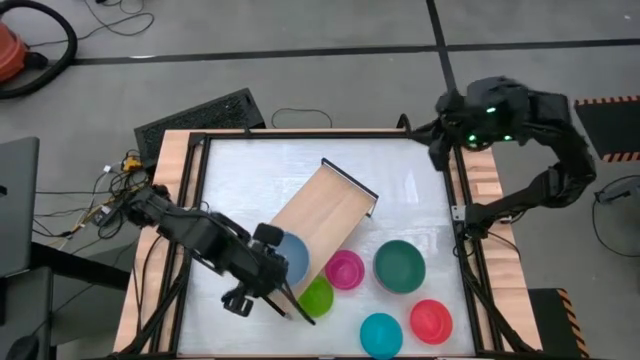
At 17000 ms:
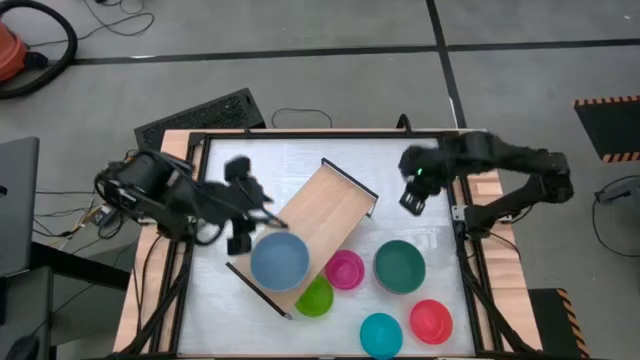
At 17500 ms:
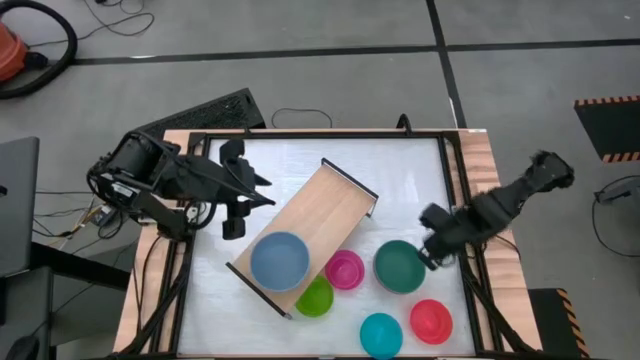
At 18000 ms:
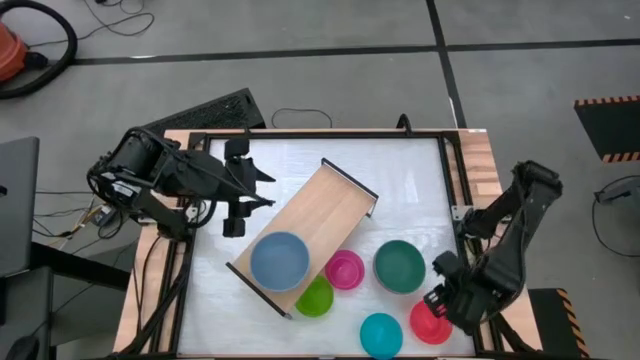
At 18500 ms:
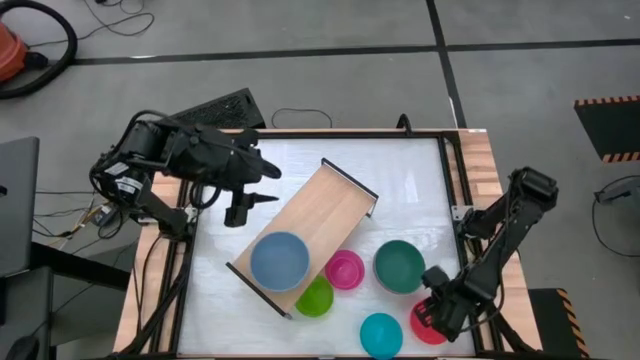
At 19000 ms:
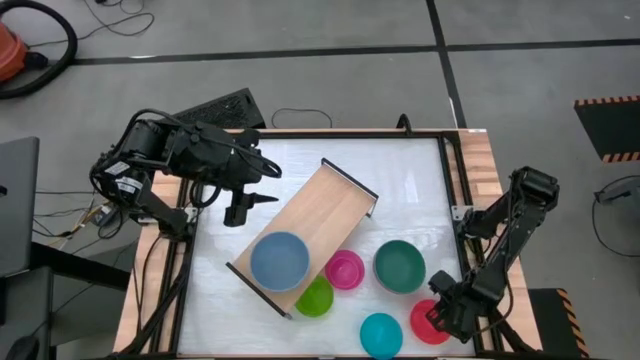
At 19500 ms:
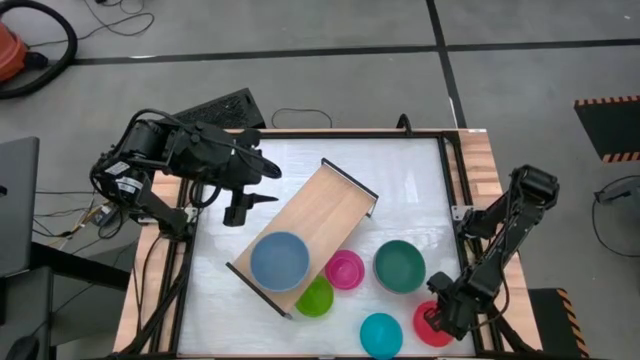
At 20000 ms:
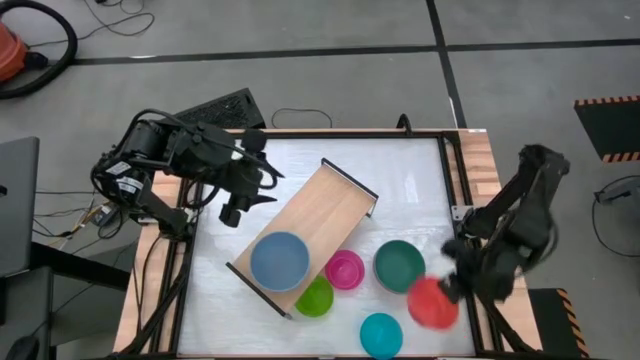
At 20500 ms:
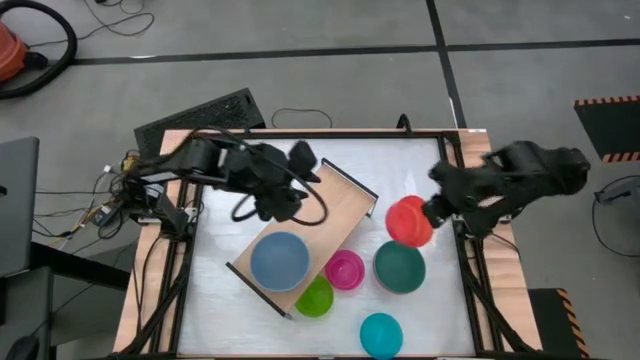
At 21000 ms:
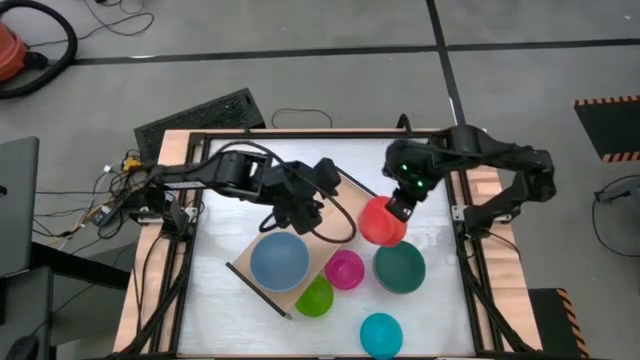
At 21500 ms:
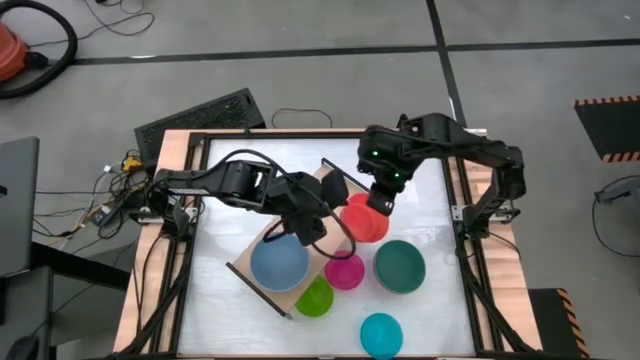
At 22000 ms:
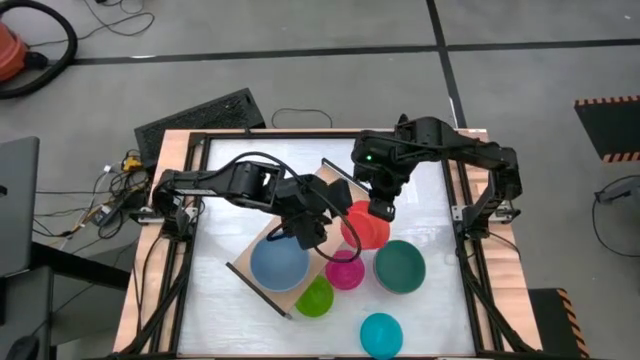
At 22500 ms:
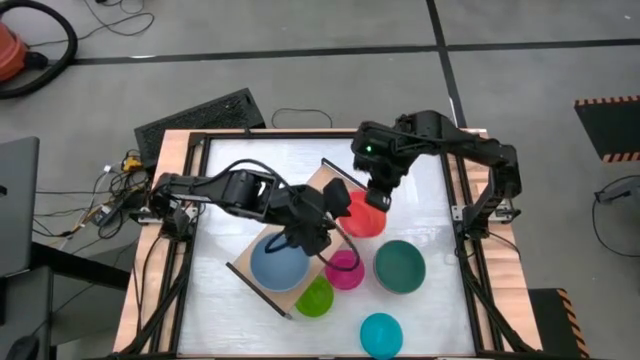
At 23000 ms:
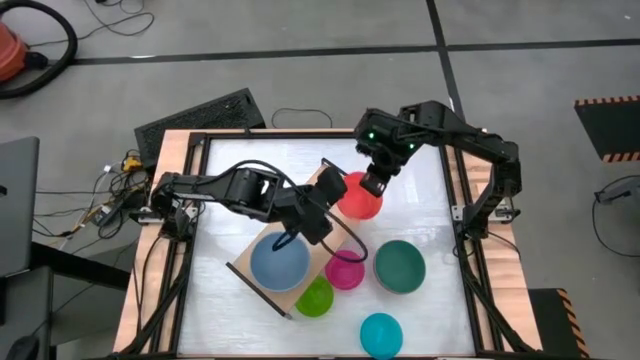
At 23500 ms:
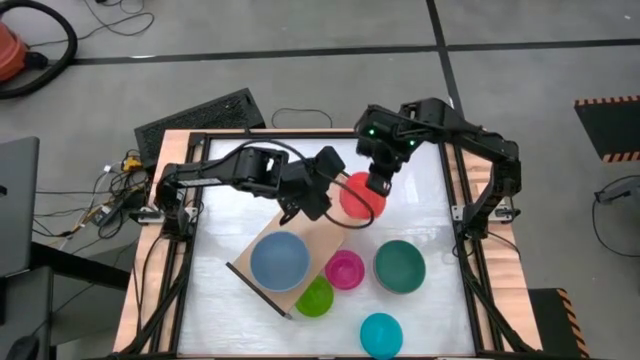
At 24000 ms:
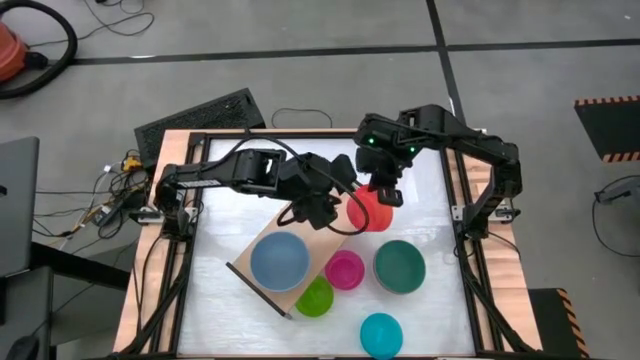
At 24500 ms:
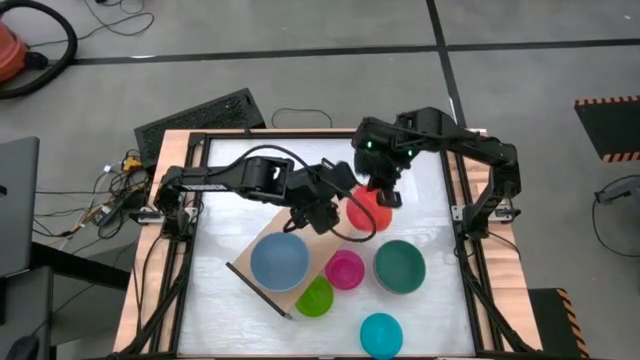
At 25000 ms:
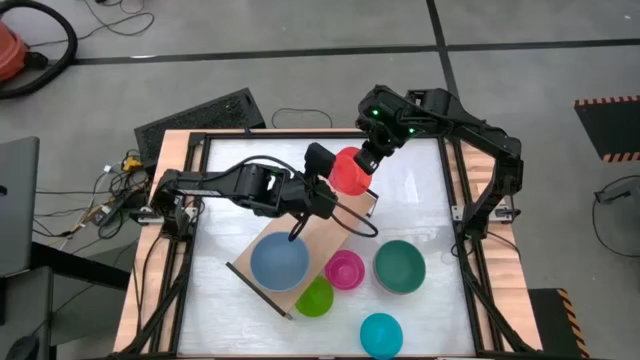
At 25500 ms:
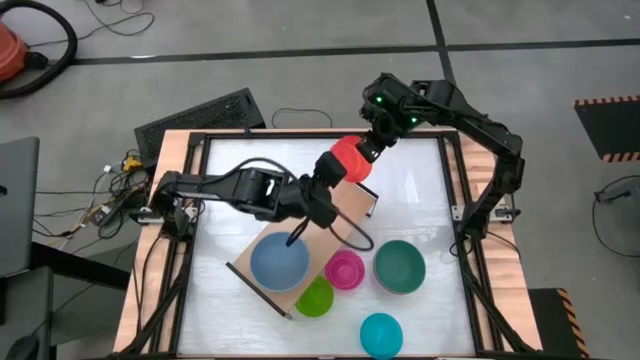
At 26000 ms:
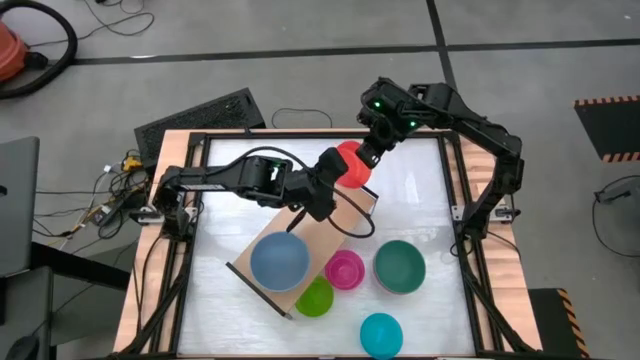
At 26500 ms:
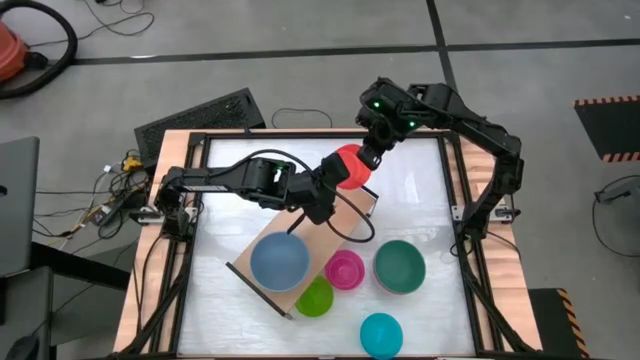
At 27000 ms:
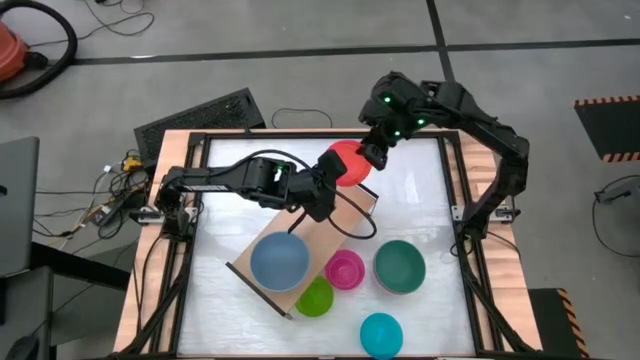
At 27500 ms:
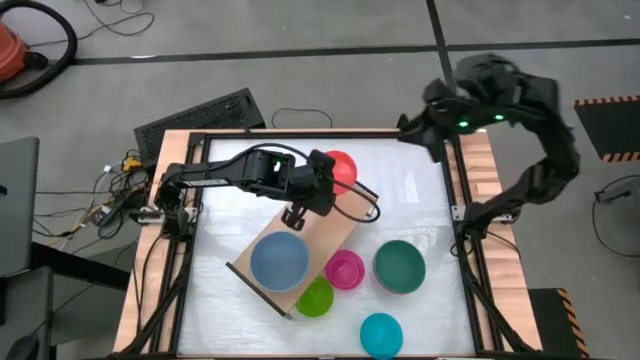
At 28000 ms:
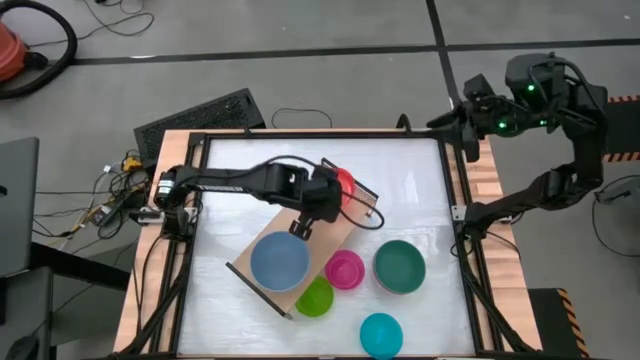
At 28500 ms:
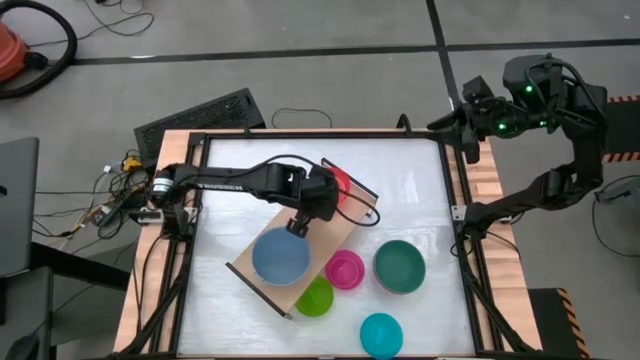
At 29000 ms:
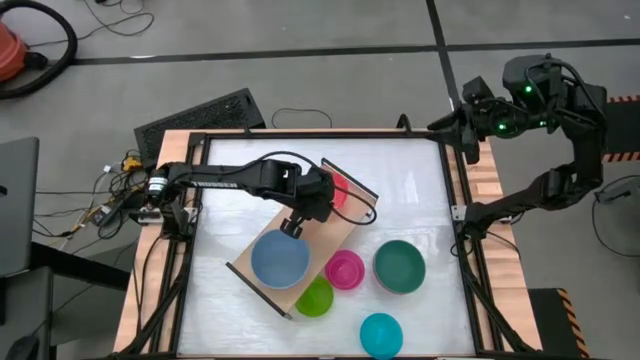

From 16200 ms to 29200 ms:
Task: Place and stack bowls onto a shelf
Put the orange bowl on the shelf

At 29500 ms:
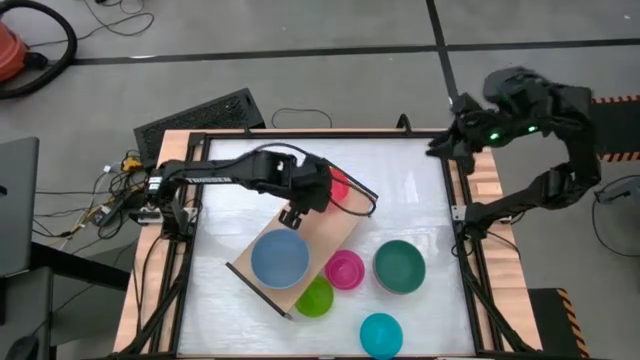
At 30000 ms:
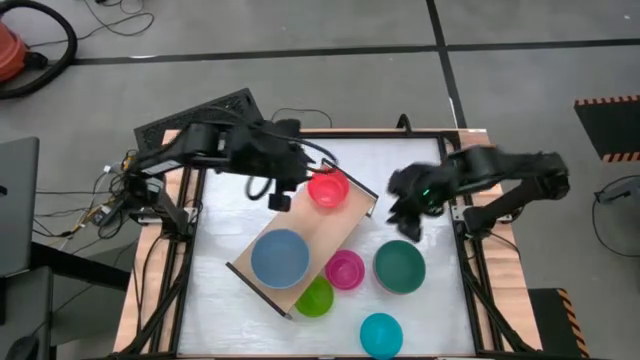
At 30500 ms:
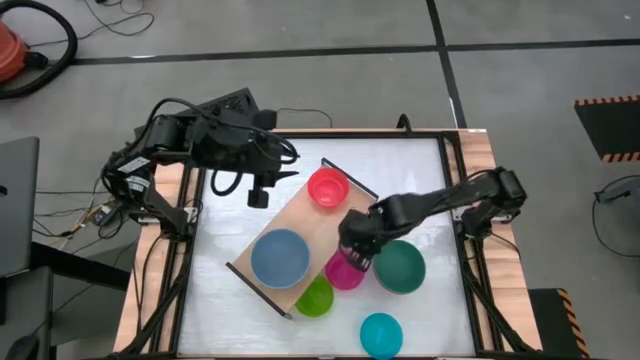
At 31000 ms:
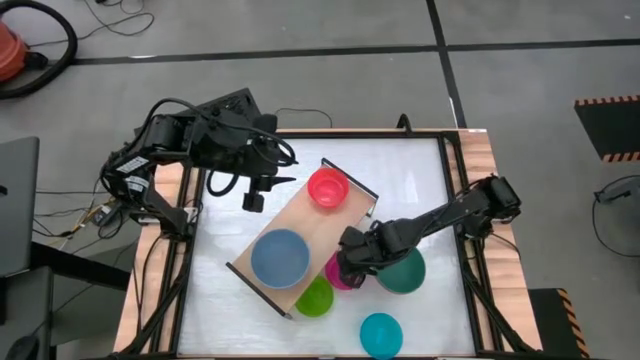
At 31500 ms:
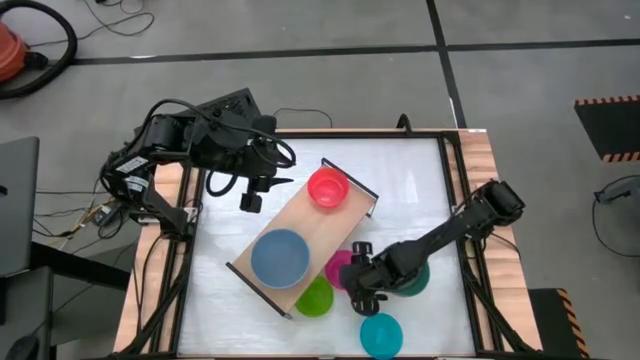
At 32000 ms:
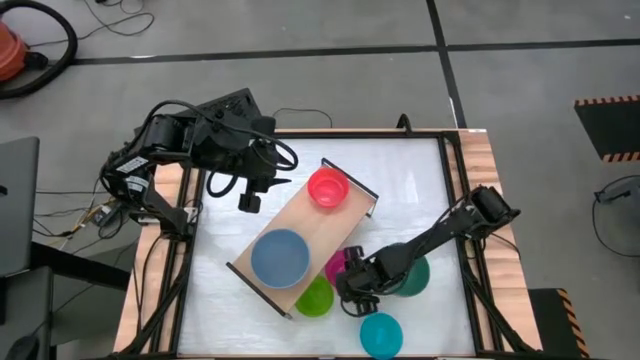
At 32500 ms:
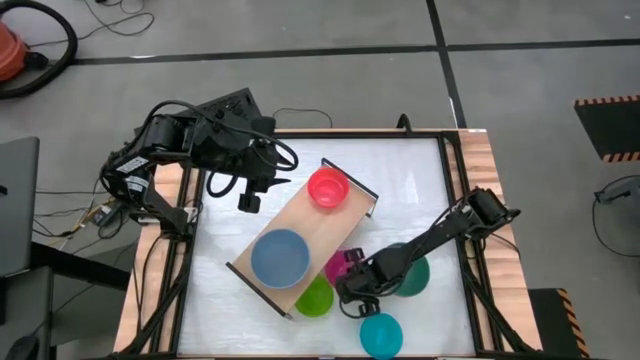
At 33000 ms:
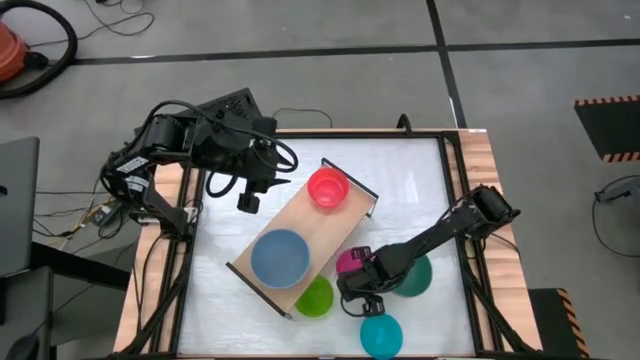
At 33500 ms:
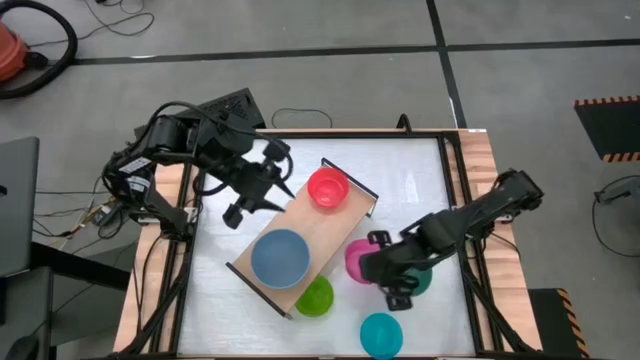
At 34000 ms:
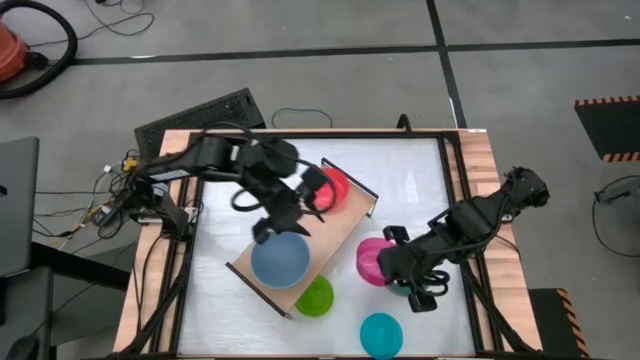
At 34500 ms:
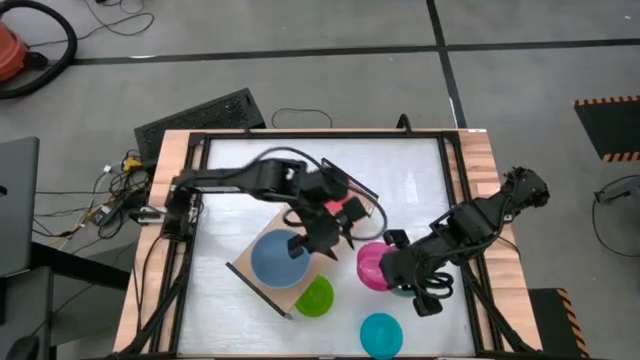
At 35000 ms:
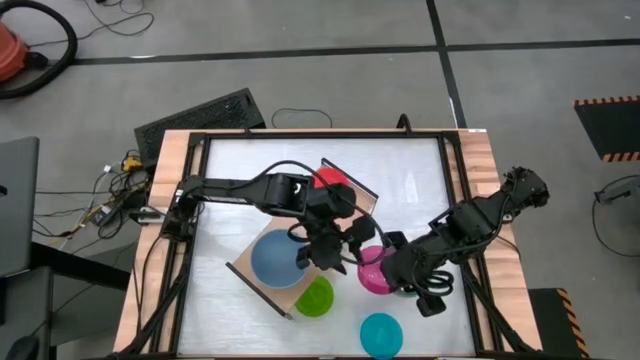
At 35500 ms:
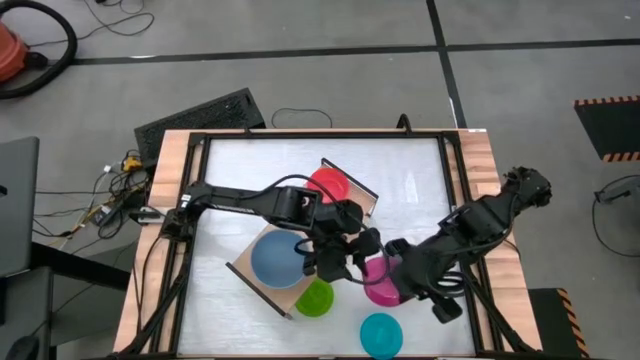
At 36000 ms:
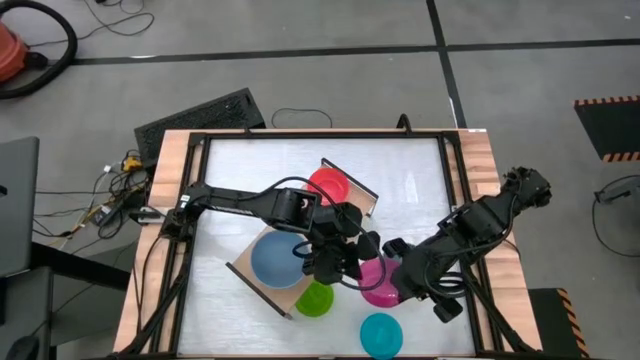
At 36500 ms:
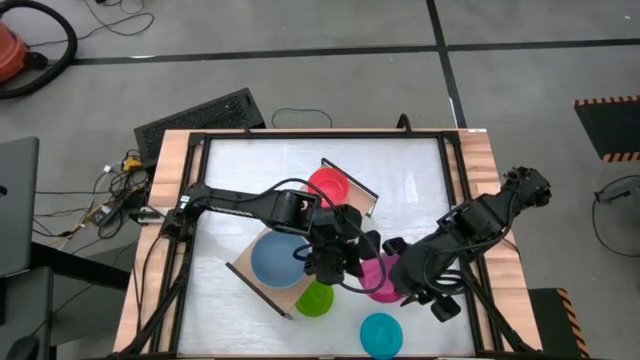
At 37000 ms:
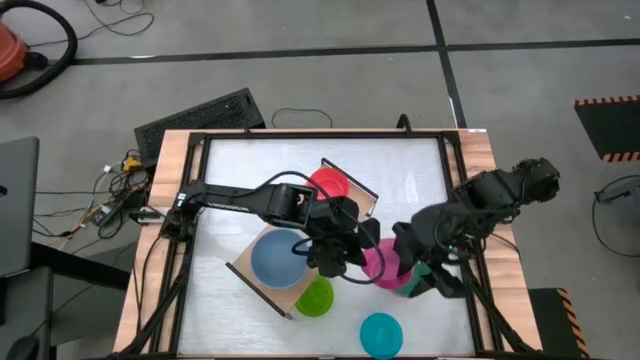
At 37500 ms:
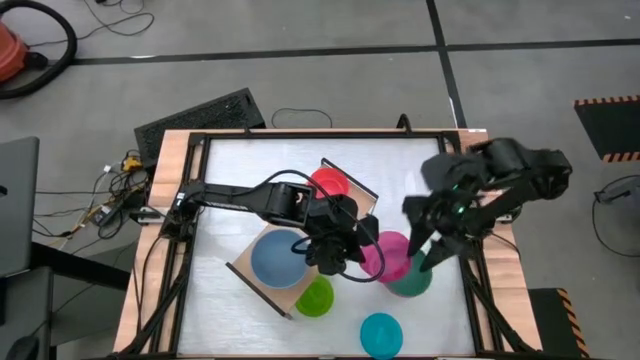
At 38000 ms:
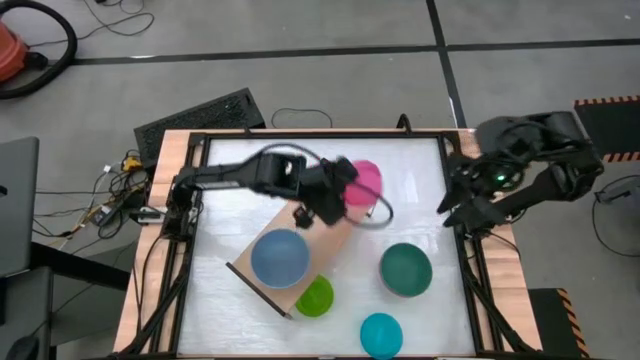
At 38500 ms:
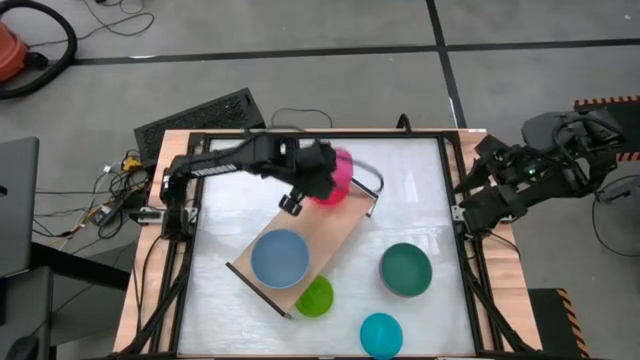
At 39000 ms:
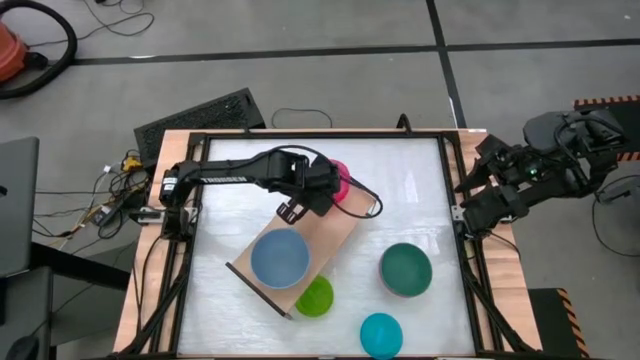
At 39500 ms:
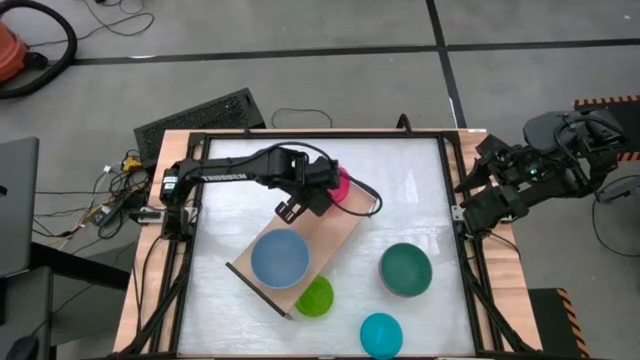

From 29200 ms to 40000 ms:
Stack the pink bowl onto the orange bowl on the shelf
